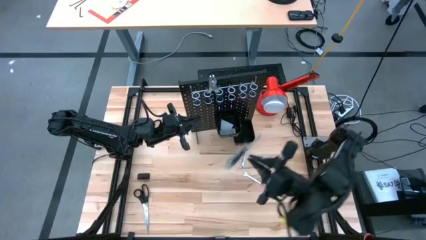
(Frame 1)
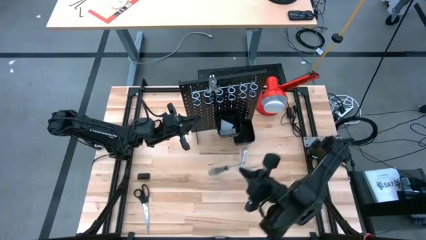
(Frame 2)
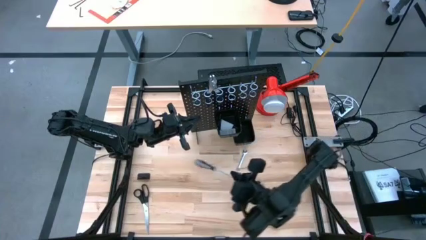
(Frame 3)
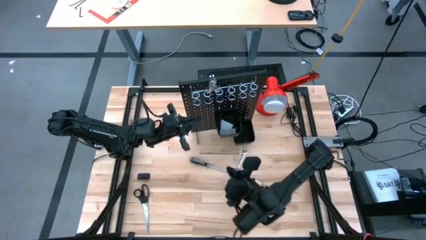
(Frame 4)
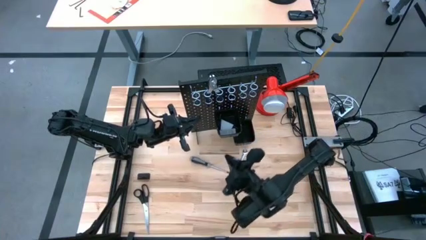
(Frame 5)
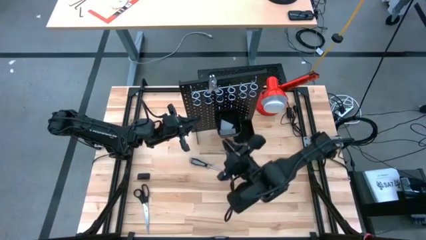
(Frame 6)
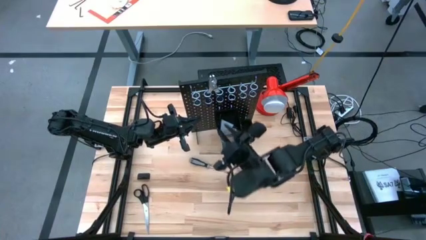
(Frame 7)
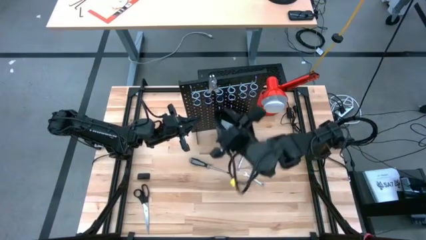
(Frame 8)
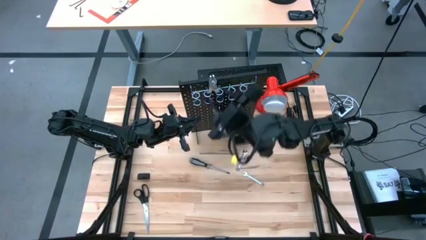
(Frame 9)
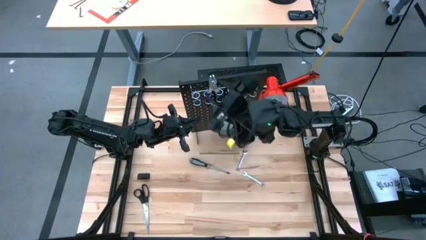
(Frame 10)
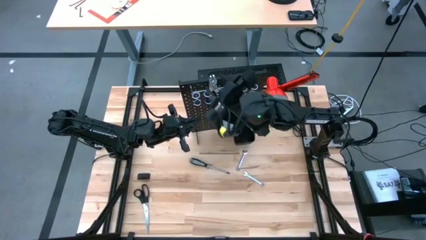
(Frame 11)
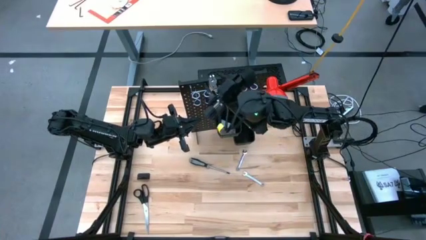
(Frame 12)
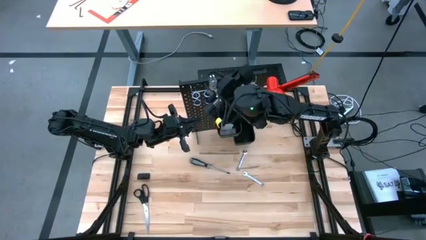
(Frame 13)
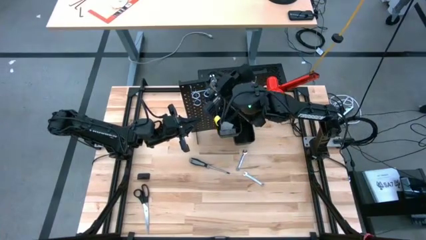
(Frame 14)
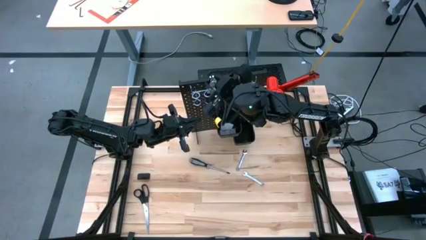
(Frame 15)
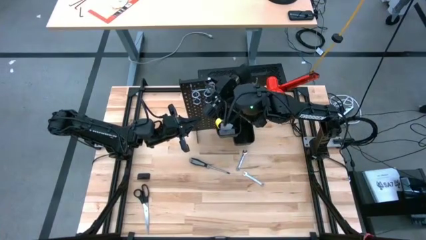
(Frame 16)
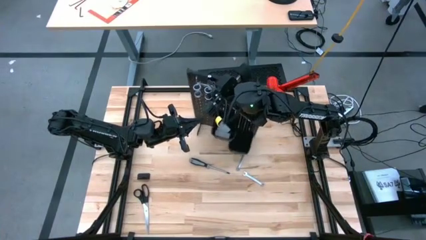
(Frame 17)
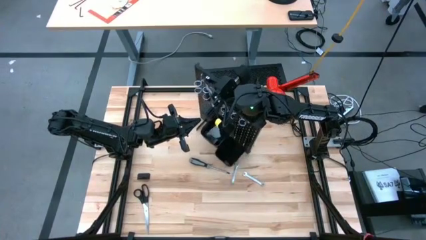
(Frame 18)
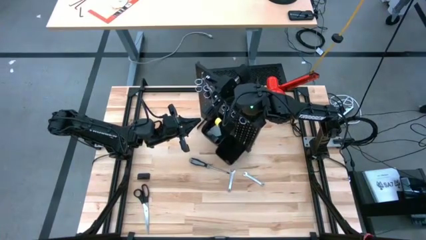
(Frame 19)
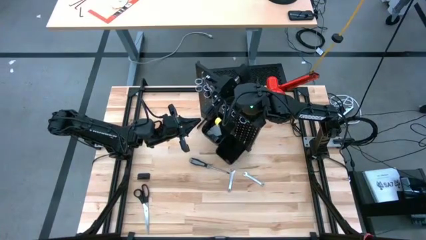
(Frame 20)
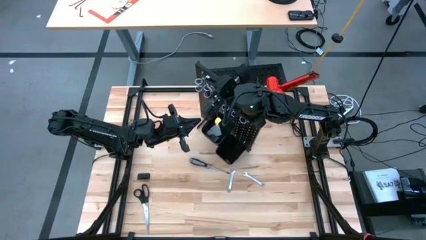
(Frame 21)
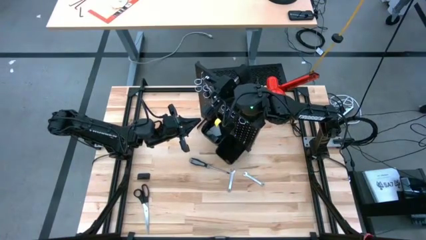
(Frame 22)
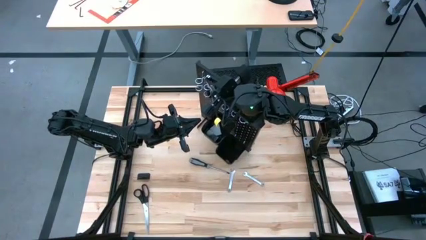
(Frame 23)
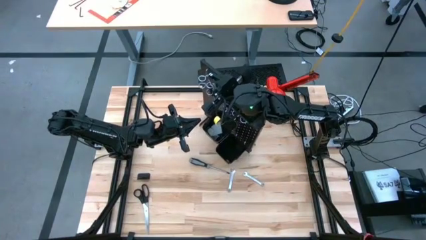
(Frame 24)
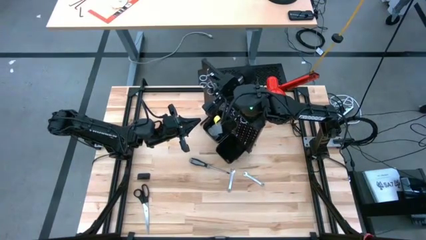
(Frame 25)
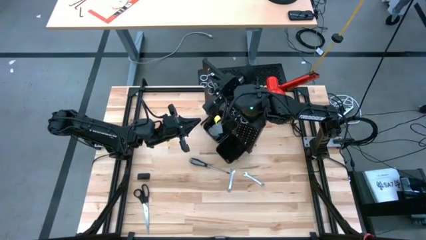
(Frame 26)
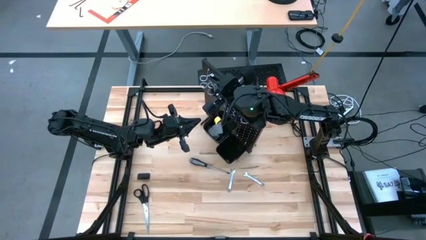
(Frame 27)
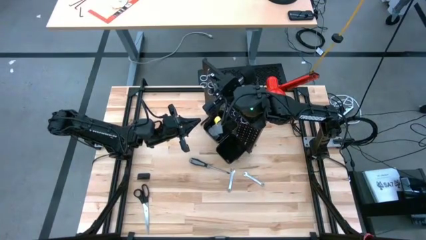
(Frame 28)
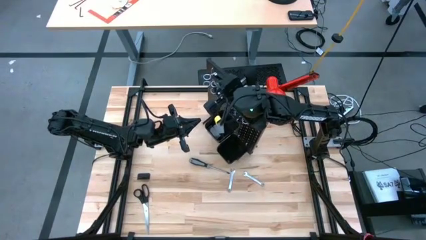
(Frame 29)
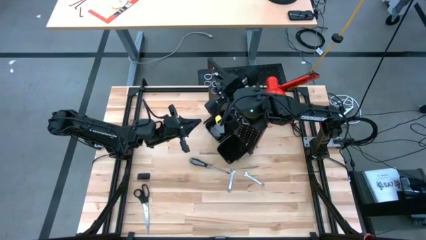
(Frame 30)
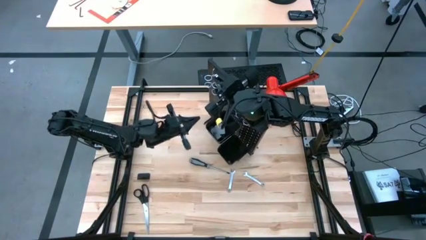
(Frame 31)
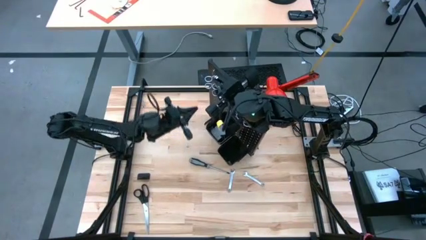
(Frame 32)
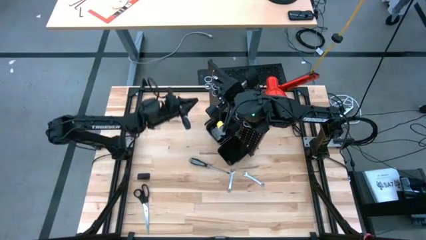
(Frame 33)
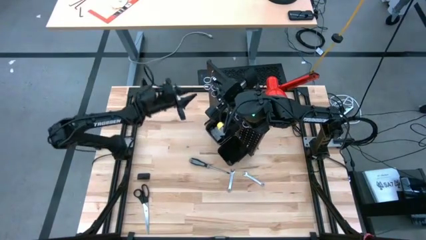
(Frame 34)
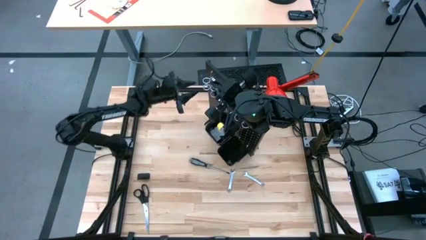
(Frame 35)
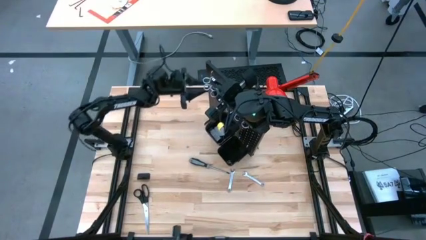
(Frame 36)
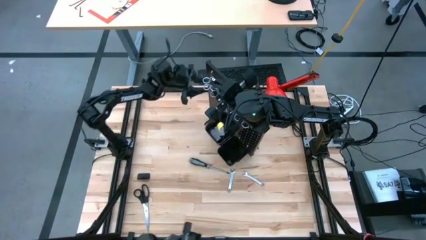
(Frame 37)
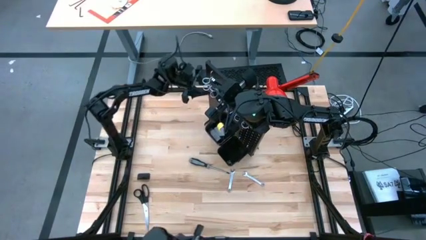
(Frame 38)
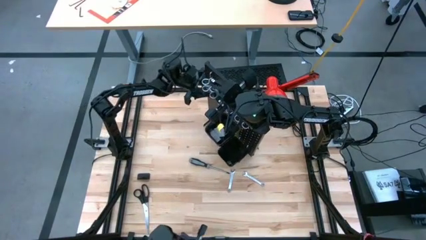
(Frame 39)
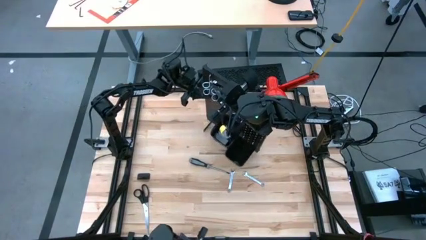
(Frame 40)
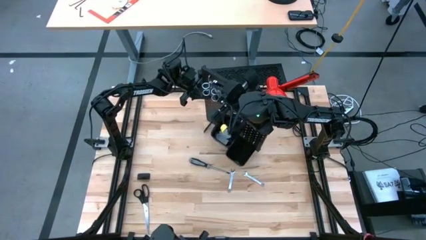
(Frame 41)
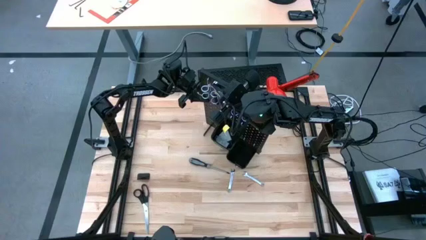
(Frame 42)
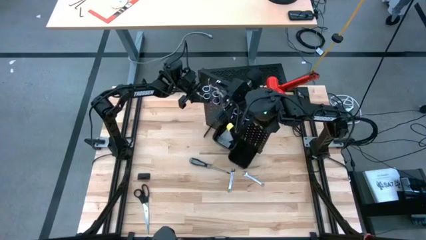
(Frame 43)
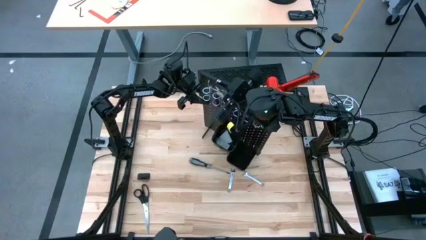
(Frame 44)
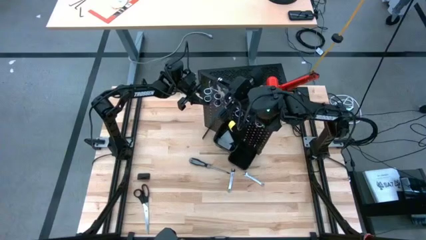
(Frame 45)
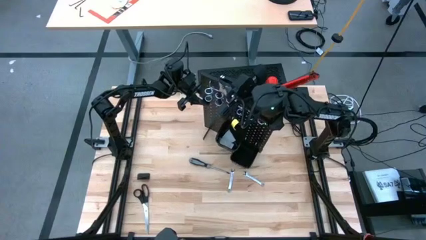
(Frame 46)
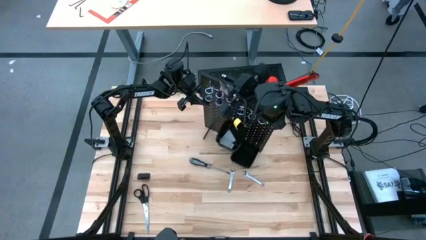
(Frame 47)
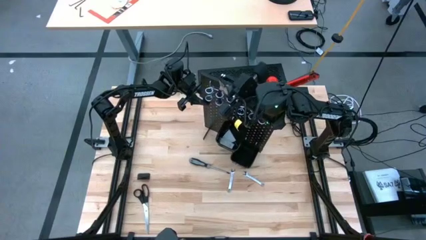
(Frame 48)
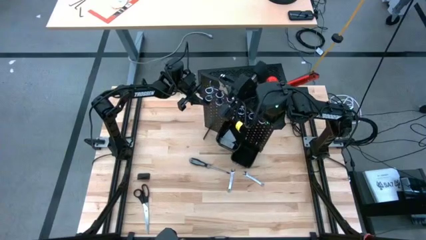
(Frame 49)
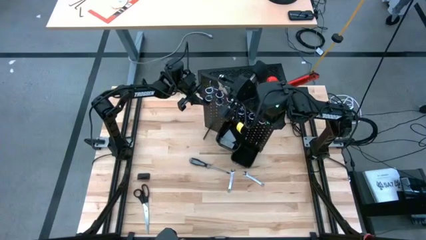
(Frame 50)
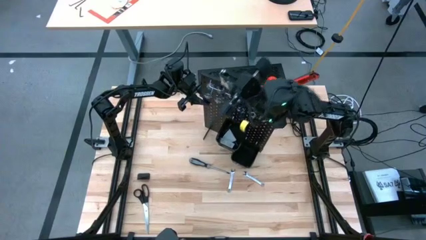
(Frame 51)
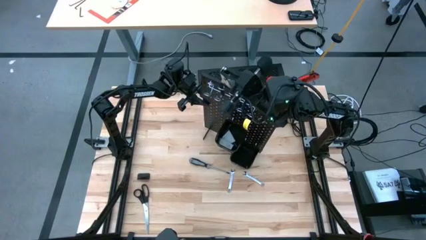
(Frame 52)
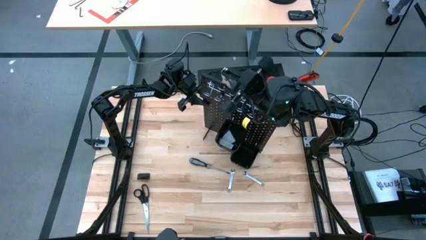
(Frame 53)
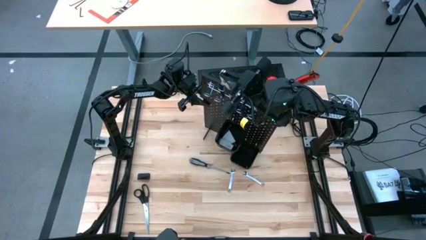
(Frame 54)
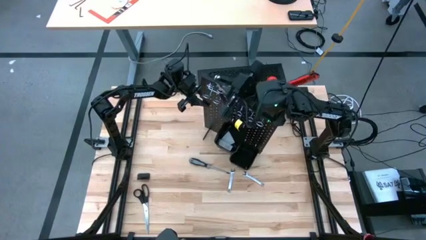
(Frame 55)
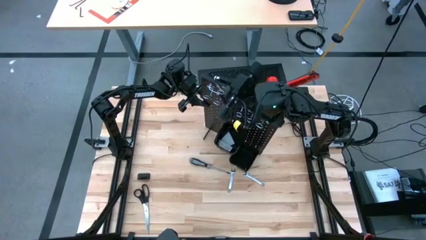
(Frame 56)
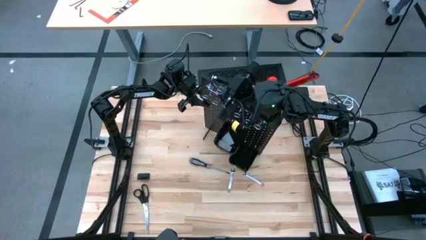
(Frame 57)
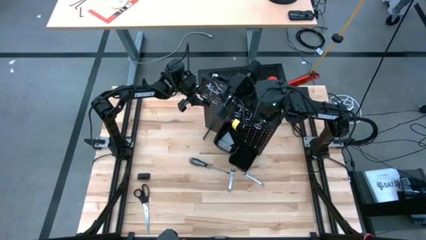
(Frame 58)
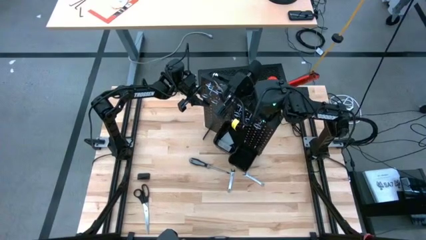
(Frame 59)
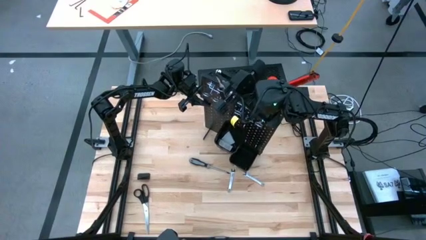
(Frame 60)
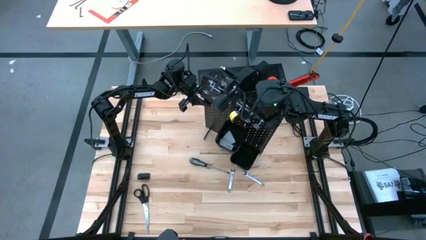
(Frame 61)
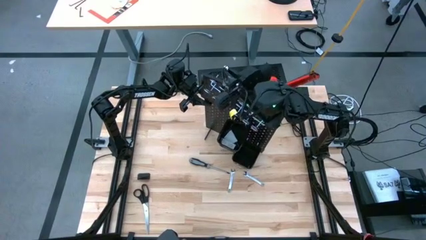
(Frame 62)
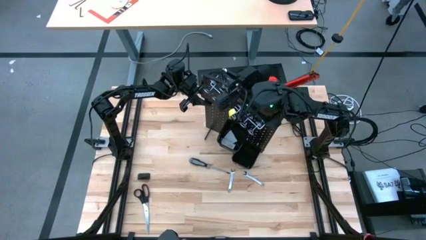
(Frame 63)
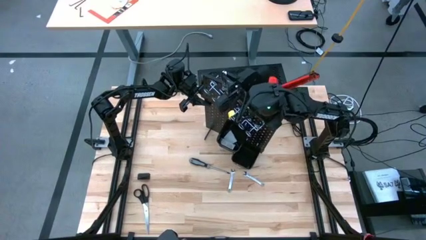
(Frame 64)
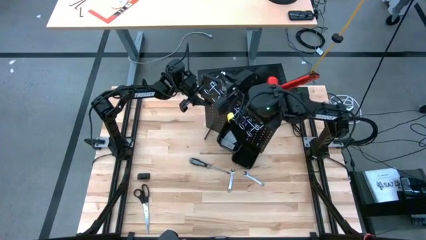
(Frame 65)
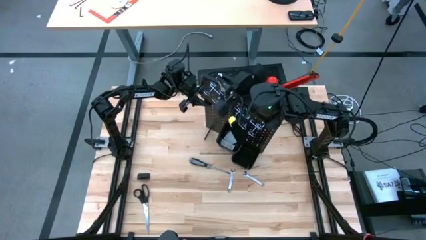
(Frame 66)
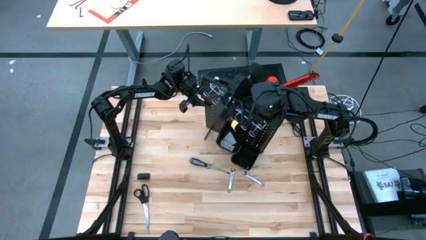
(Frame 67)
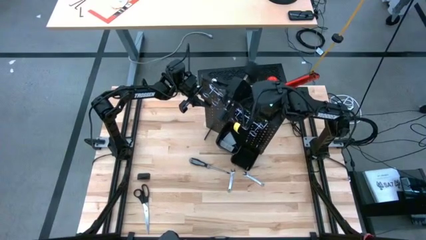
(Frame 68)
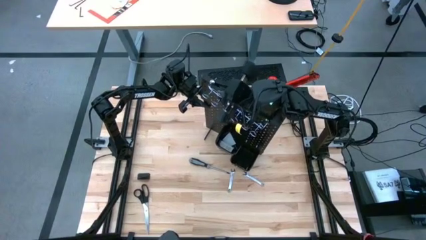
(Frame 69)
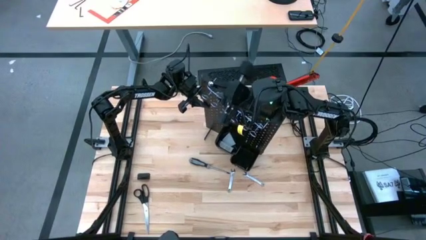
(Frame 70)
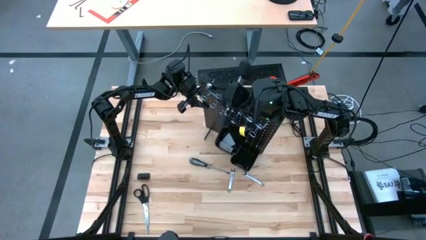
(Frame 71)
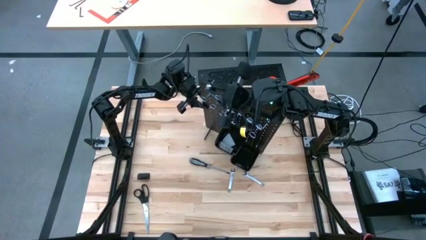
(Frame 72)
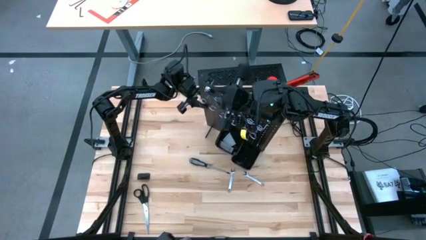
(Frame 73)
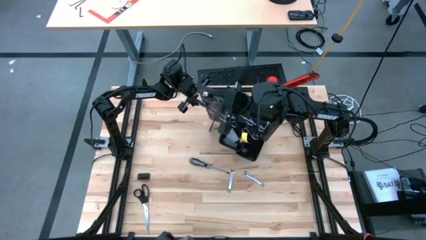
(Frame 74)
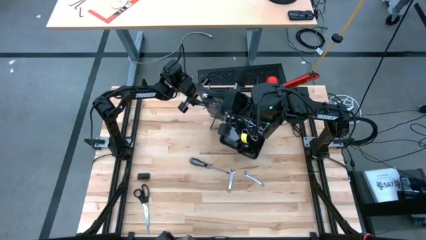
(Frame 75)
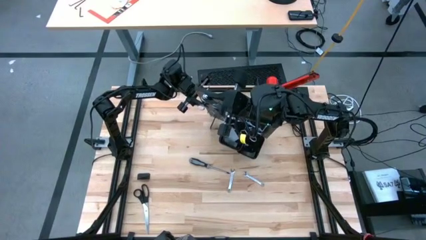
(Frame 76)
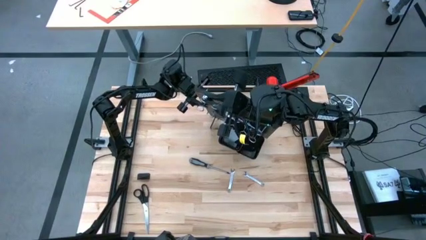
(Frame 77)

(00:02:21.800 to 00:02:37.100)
Task: Hang tools onto peg board
Unhang the pliers from the pegboard
